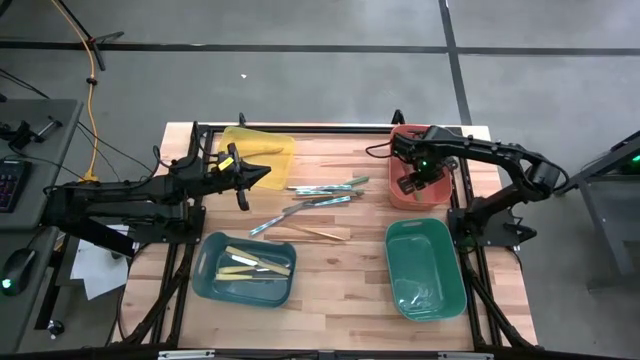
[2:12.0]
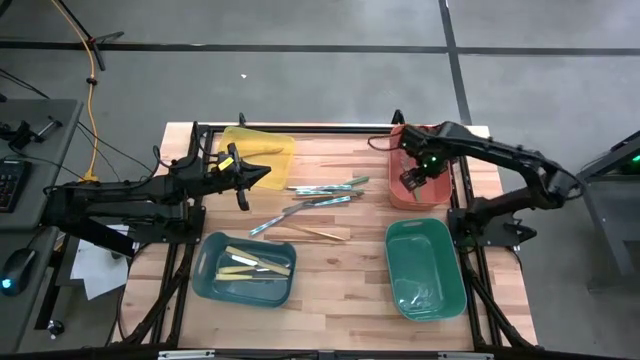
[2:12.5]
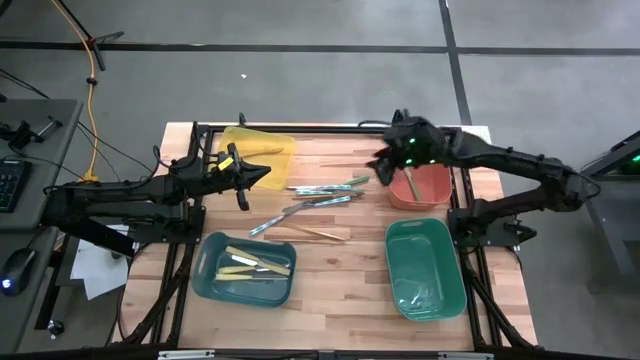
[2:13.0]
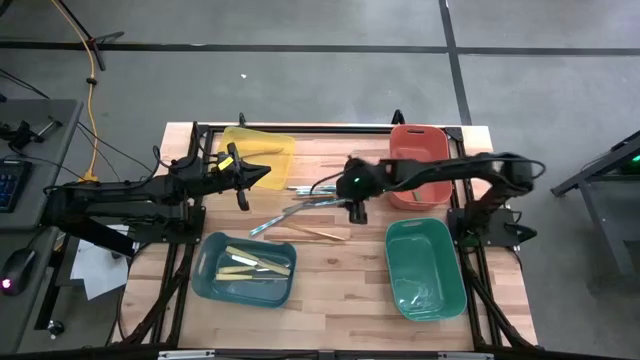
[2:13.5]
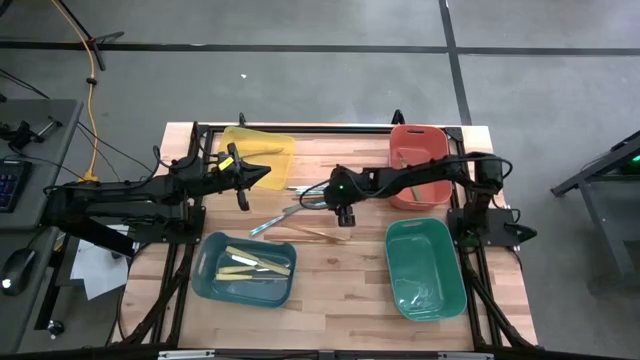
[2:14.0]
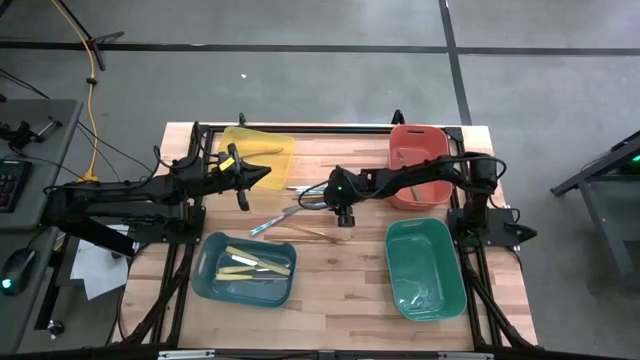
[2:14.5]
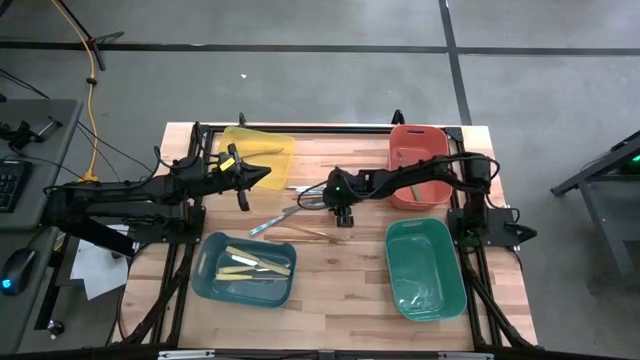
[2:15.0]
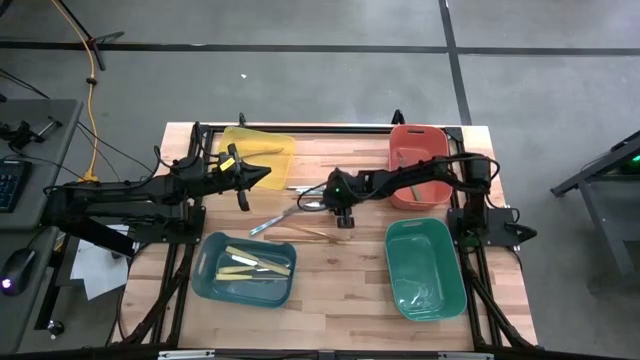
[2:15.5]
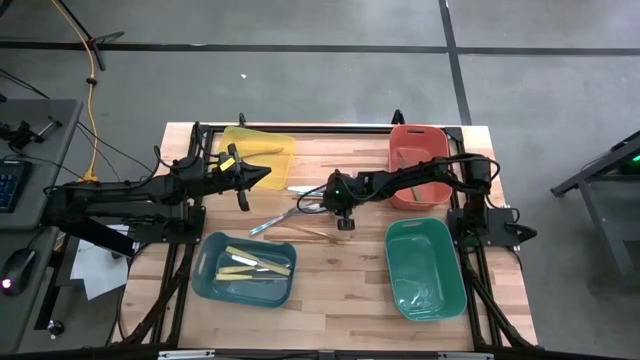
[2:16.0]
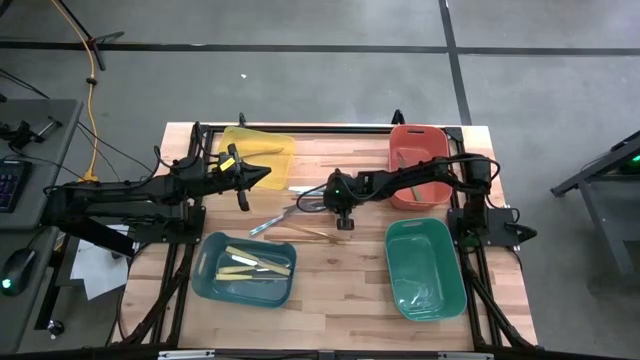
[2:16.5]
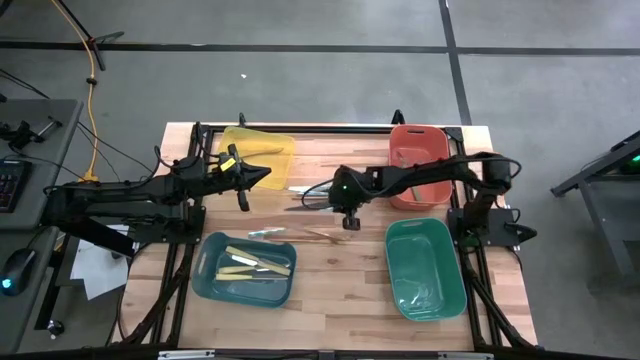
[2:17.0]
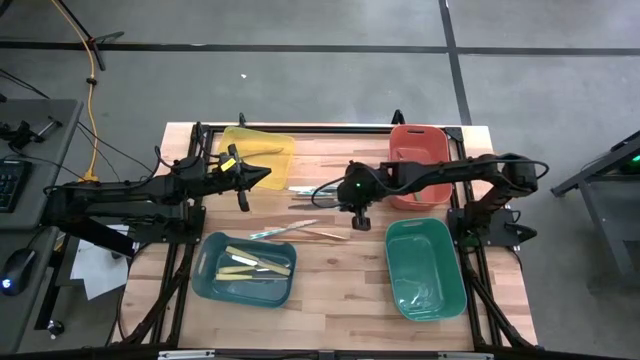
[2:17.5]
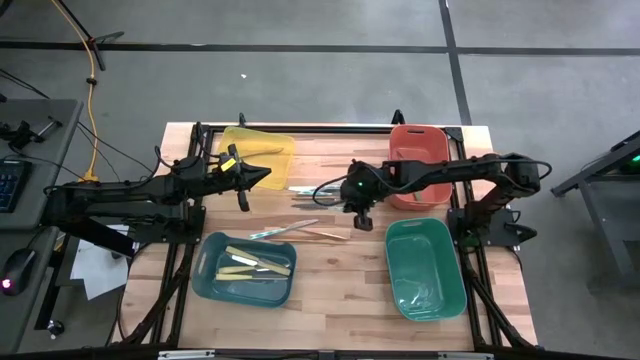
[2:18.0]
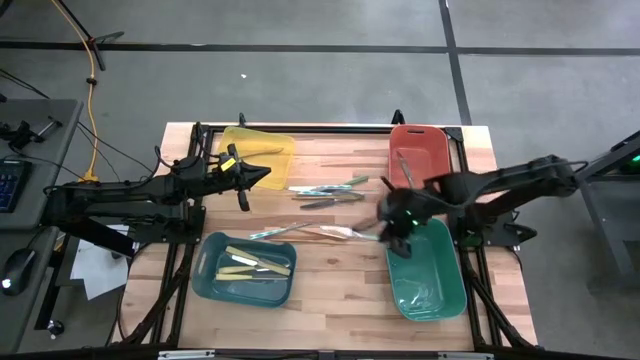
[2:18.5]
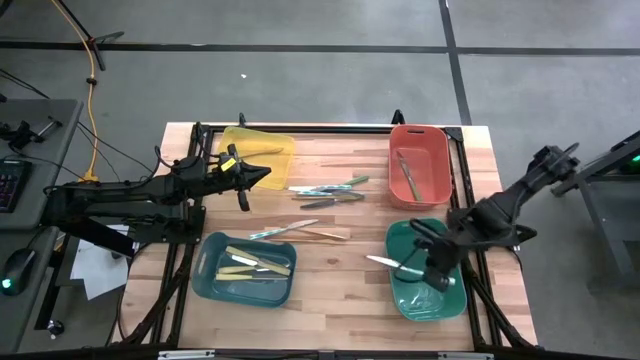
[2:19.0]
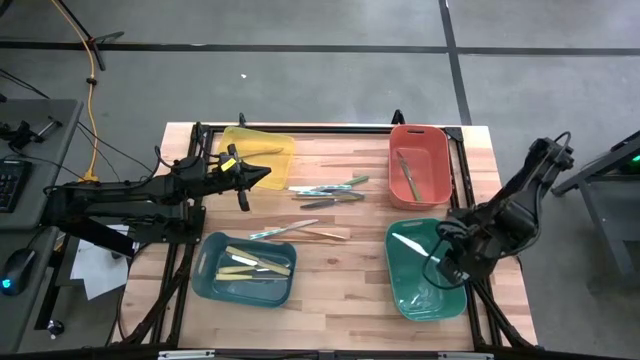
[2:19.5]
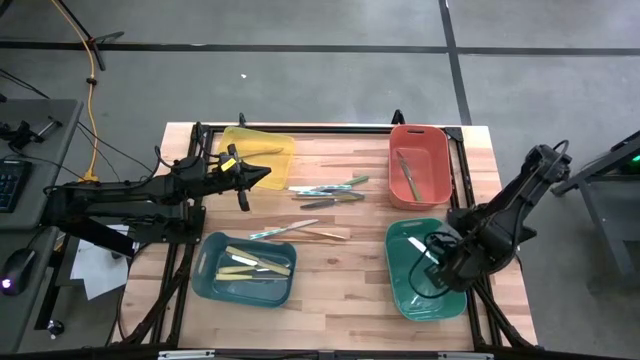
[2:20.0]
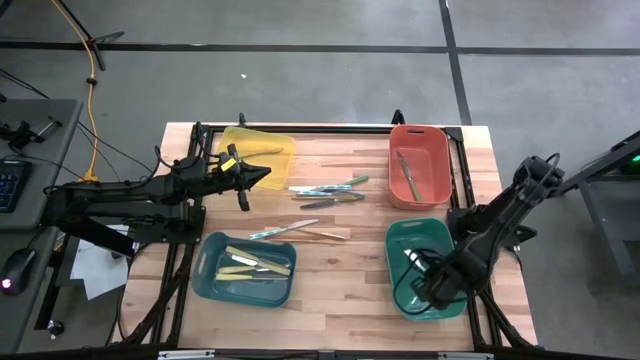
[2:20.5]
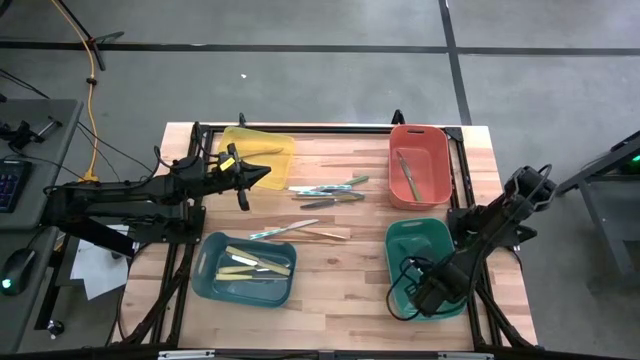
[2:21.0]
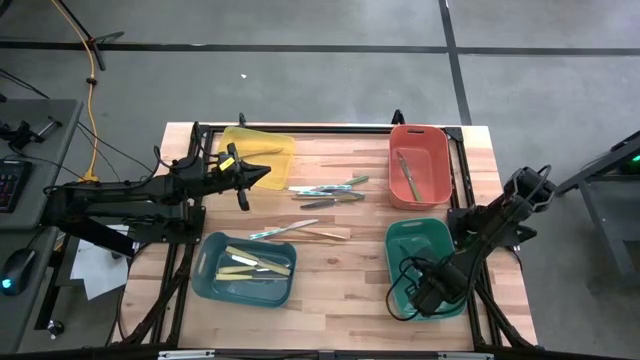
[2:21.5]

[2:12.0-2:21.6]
Task: Sort silverware by color (type)
Put the patterned green knife into the green bin

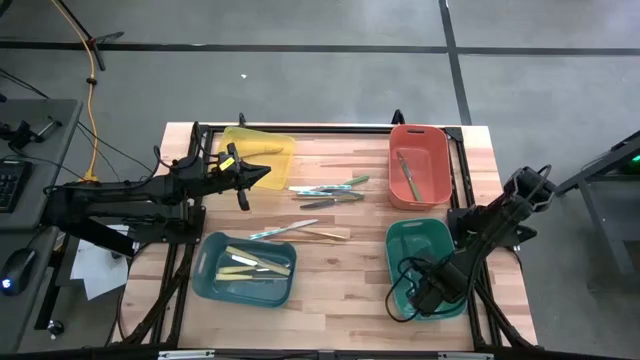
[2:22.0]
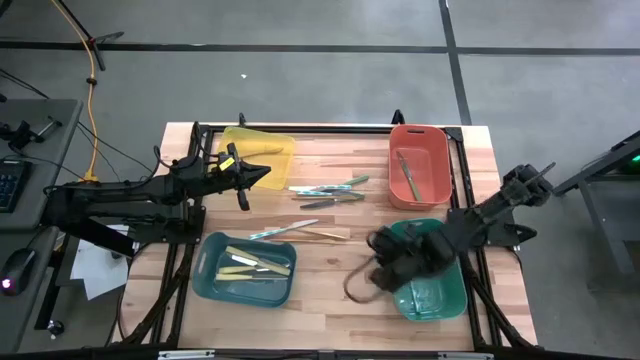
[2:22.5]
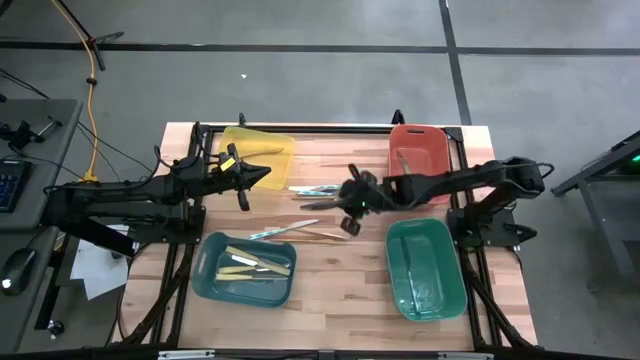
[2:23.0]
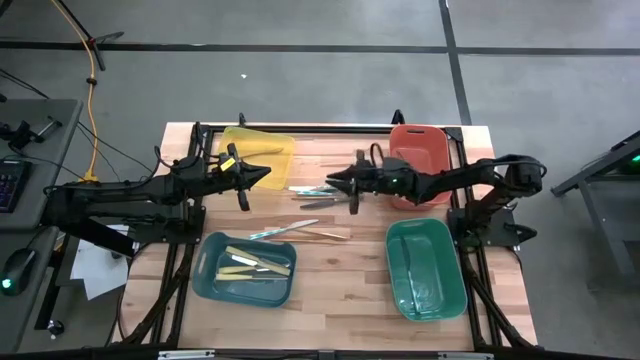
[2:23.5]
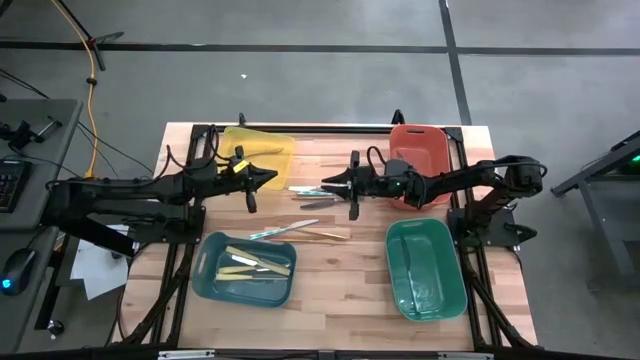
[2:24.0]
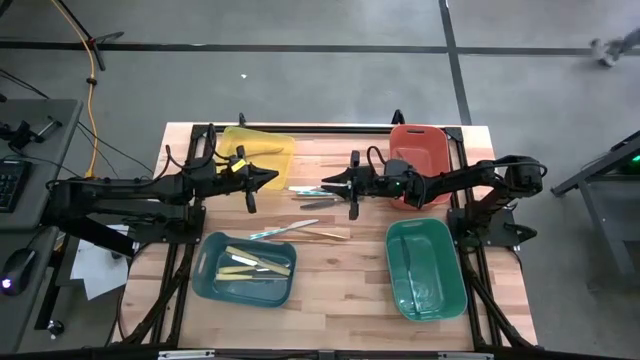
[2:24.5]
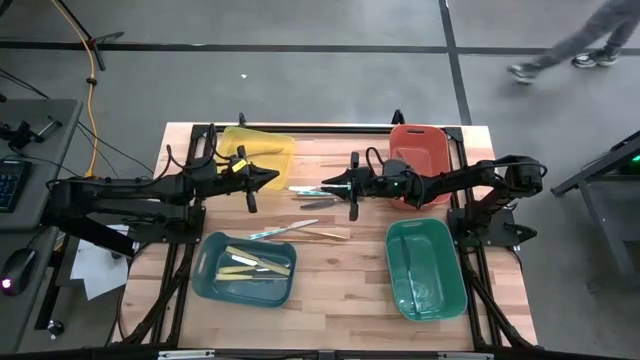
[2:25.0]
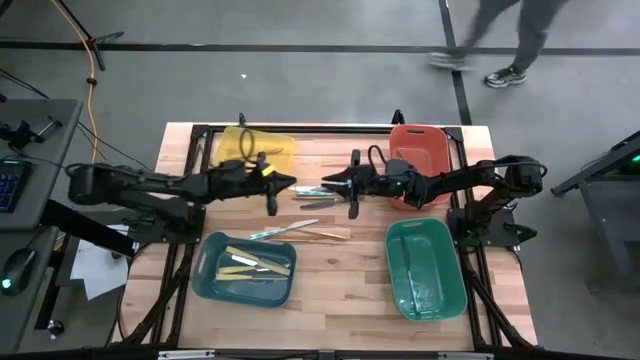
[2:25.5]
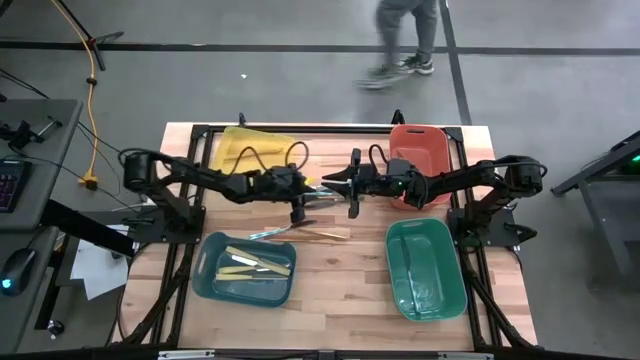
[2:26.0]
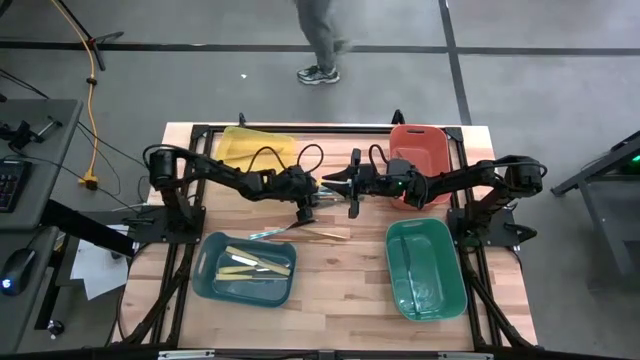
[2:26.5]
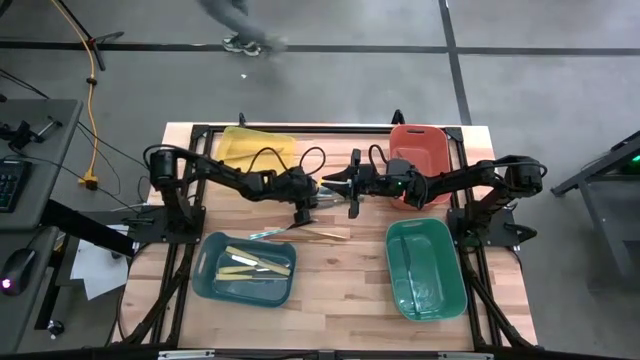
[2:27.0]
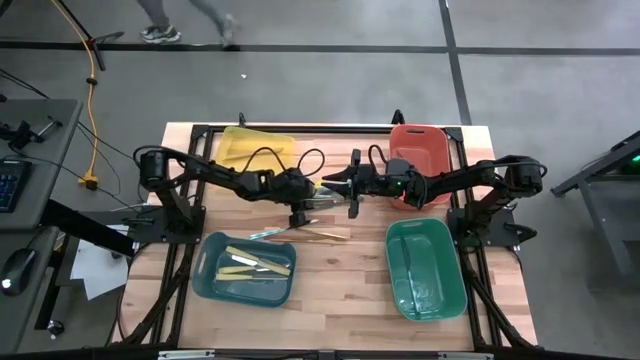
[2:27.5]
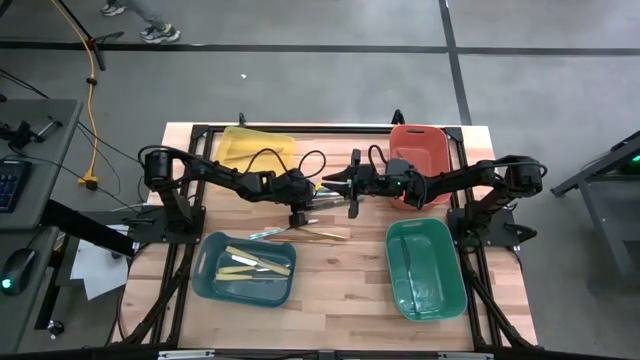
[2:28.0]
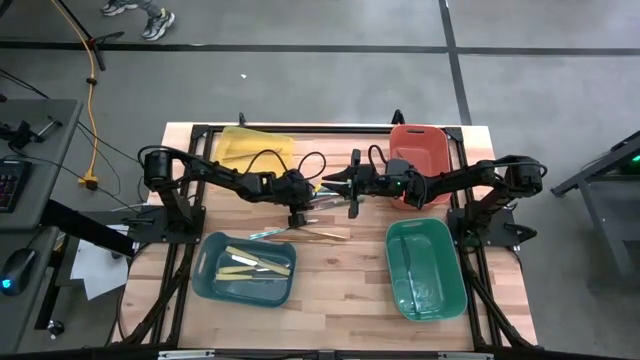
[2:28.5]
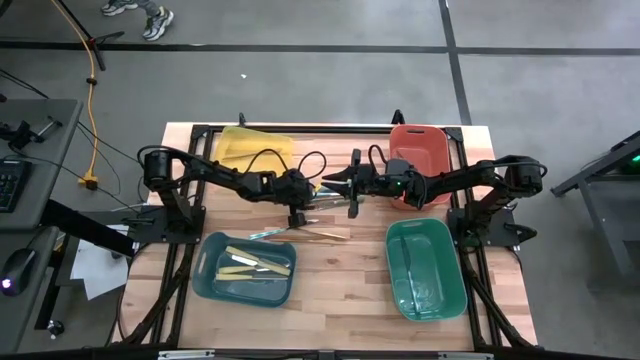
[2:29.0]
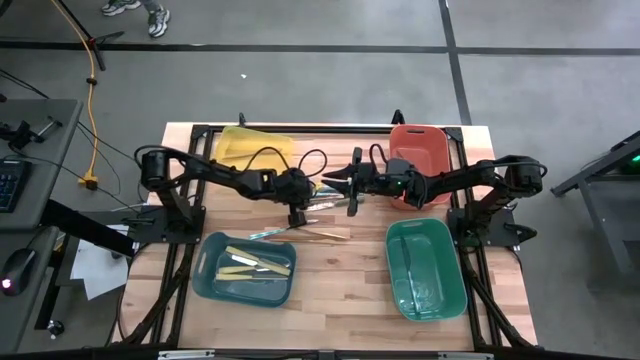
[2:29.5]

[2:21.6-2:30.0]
Put the gold knife into the yellow bin

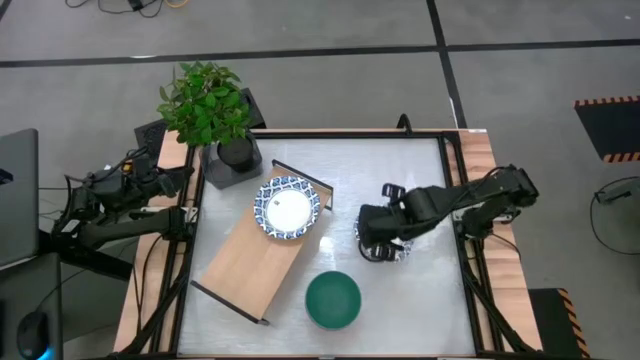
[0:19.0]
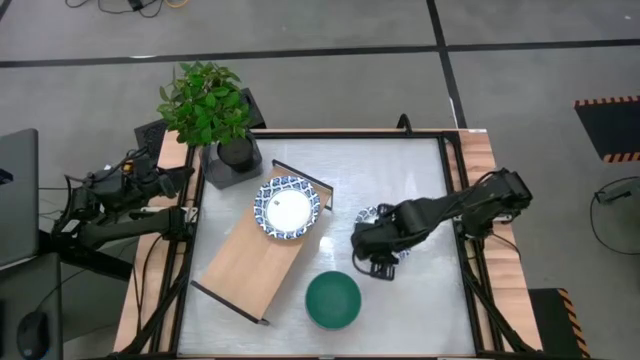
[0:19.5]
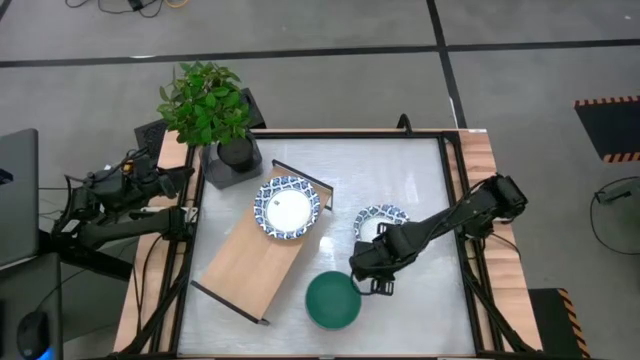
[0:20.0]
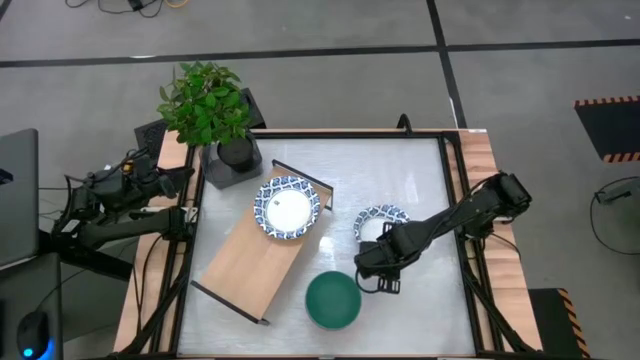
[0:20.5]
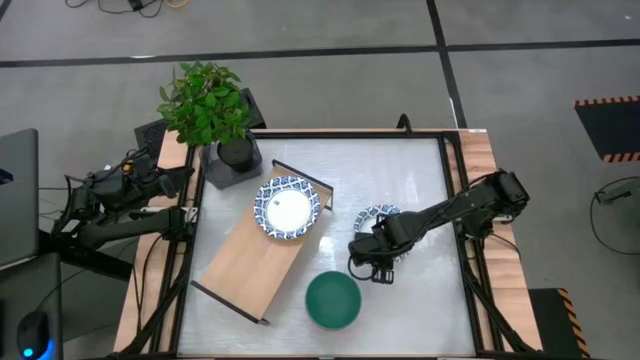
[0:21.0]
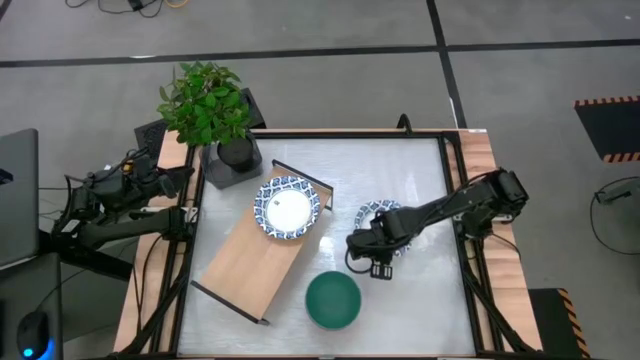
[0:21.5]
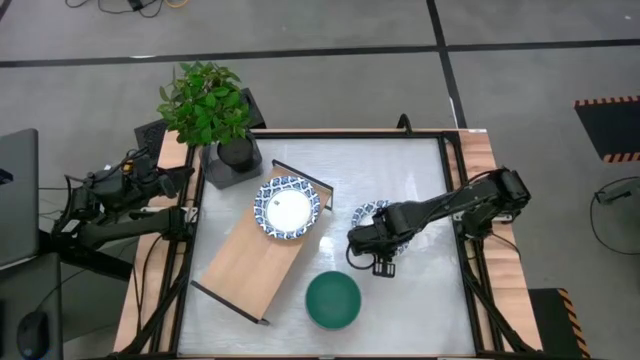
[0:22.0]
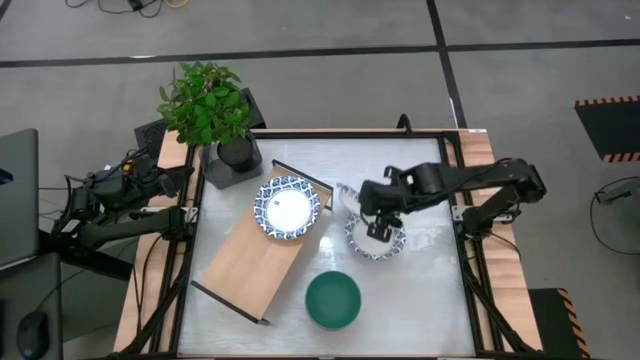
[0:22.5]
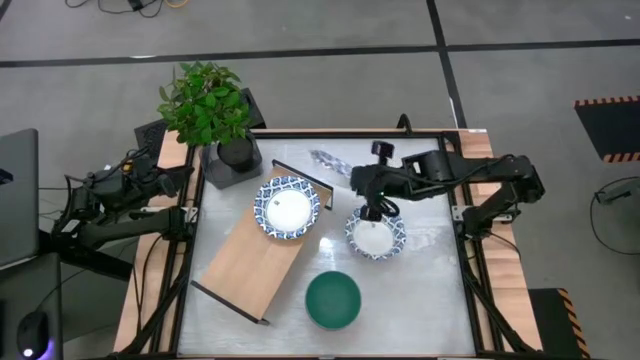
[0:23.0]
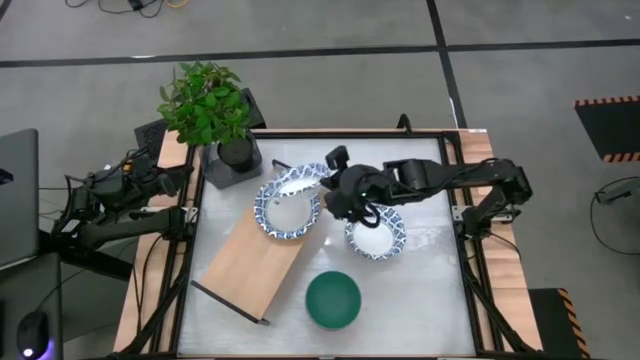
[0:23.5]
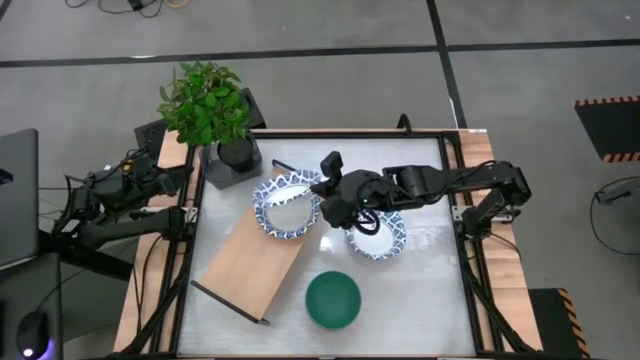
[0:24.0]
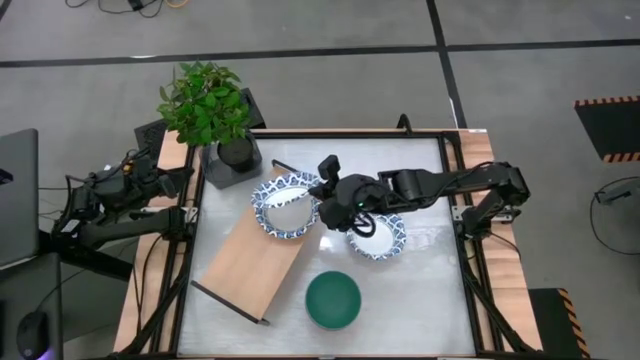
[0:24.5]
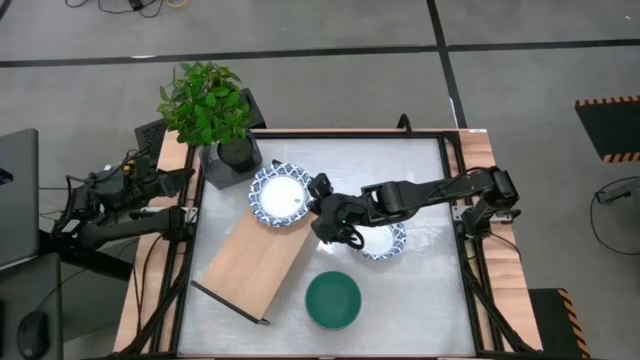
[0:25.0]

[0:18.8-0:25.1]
Task: Place and stack bowls onto a shelf
Stack the white patterned bowl on the white patterned bowl on the shelf
